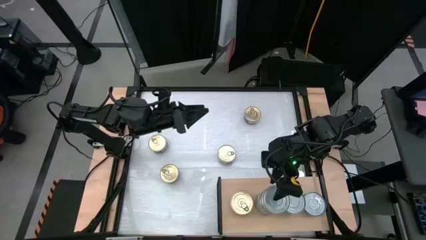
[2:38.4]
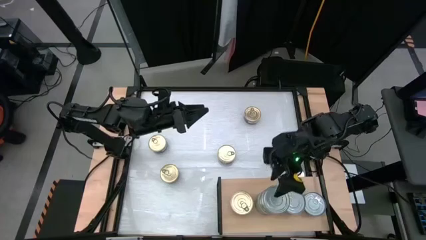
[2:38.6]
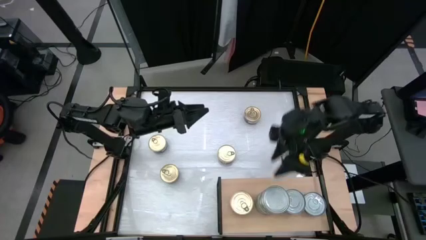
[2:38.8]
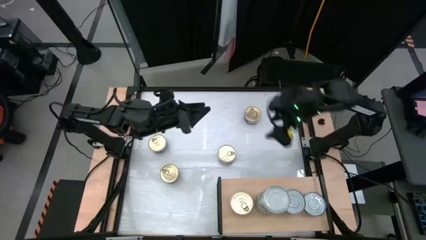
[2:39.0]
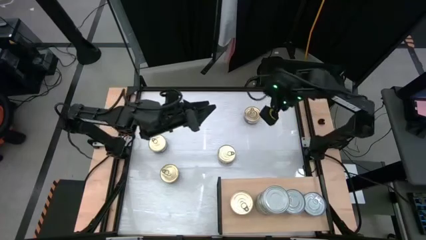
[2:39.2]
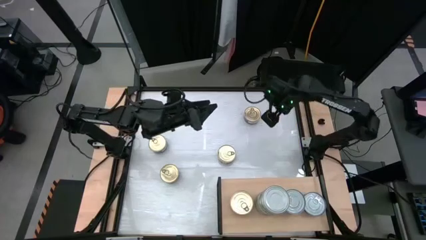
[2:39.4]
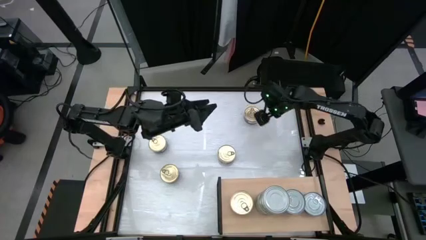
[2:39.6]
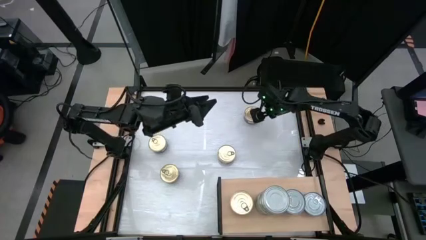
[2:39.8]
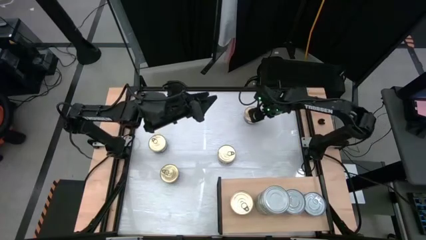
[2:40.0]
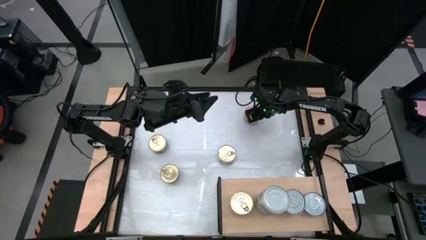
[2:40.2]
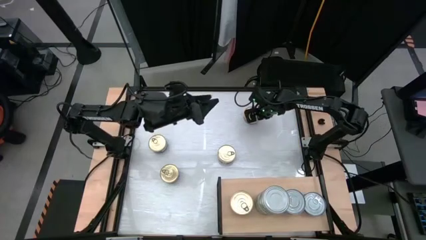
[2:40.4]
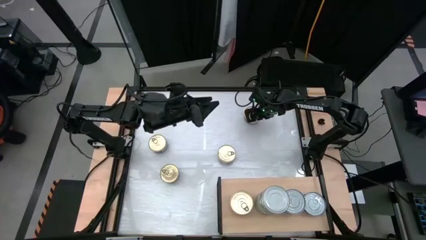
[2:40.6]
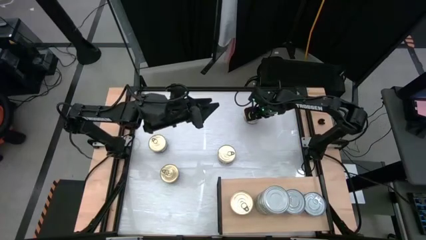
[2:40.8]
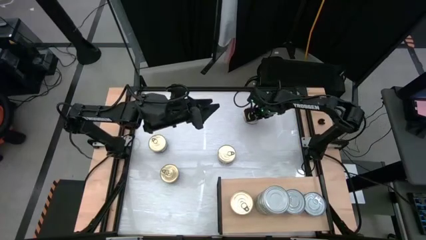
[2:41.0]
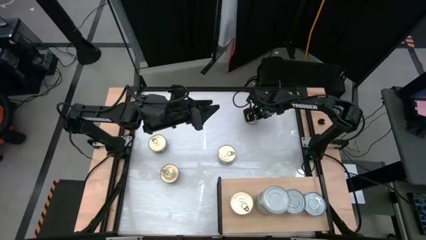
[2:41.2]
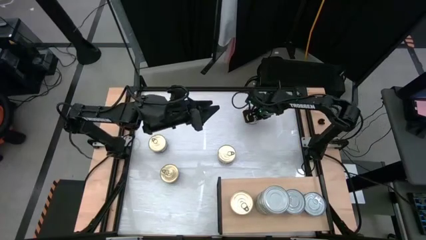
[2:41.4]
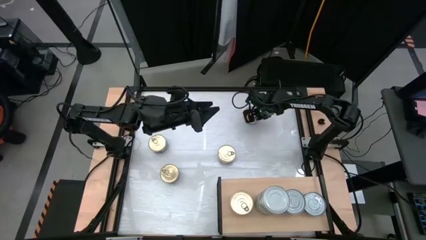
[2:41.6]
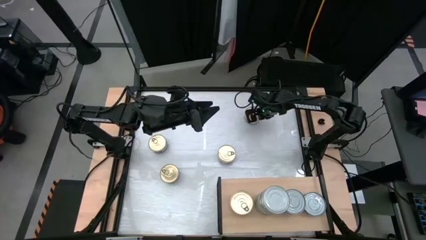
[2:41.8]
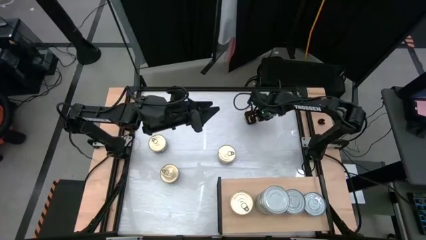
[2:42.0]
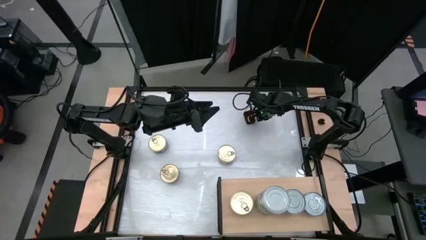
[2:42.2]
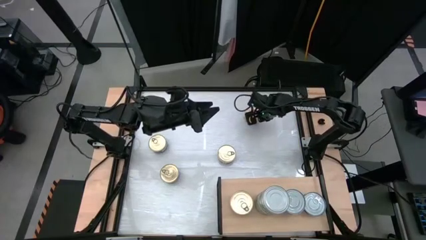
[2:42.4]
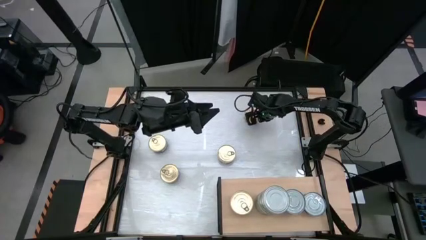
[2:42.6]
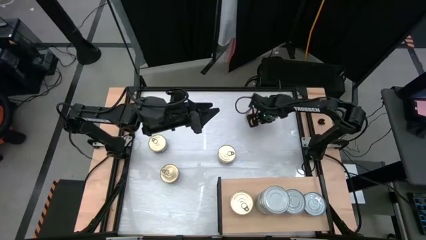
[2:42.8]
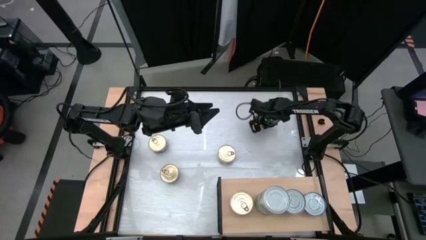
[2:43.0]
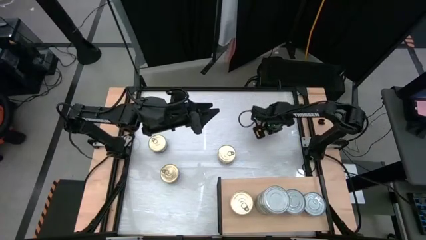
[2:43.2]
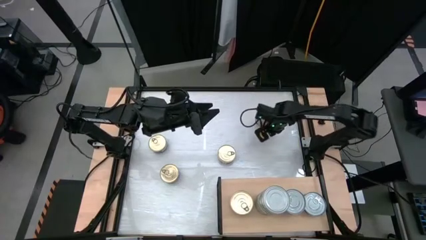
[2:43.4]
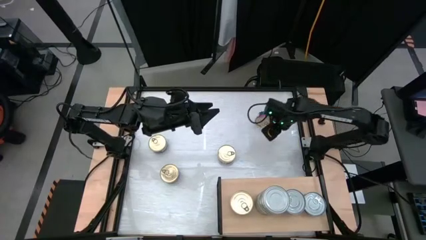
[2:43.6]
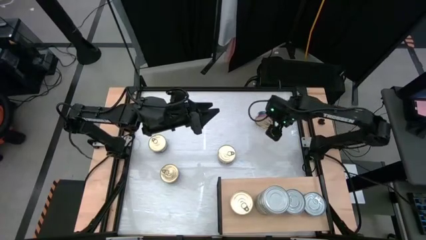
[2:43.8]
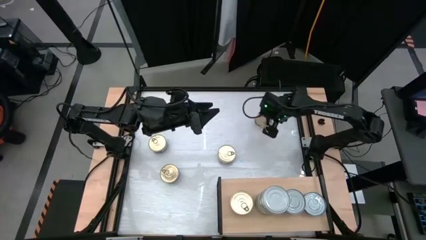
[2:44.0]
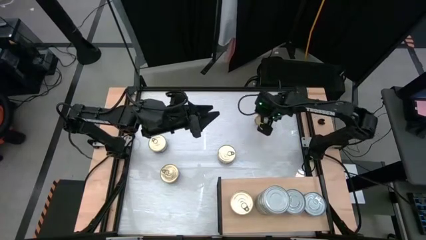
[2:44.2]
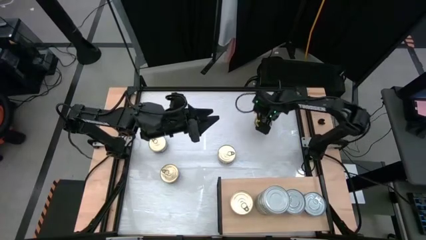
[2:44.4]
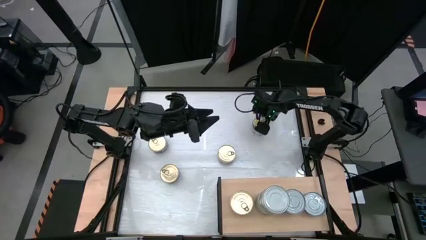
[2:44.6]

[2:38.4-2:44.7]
Task: Stack canned seafood by type on shelf
Stack the blue-pink tuna can on top of the other blue-pink tuna can on the shelf

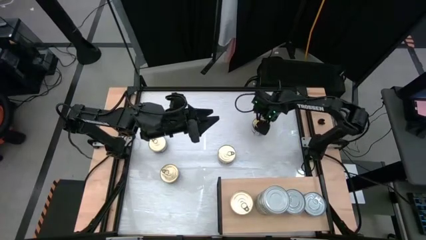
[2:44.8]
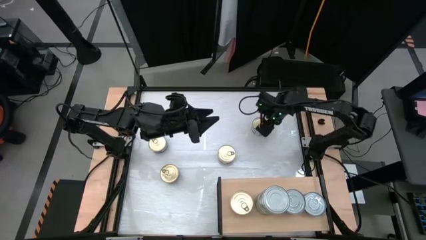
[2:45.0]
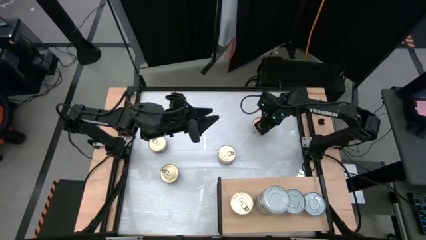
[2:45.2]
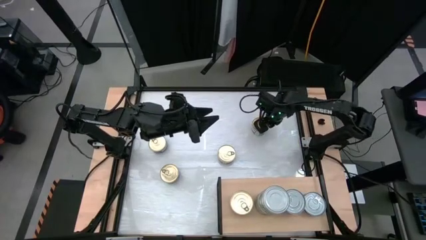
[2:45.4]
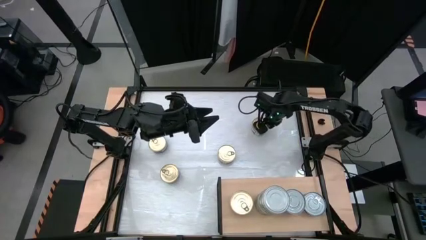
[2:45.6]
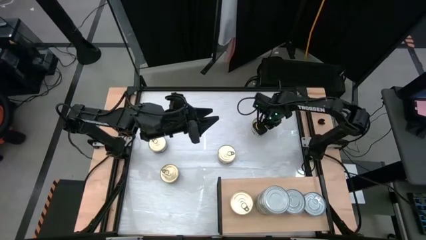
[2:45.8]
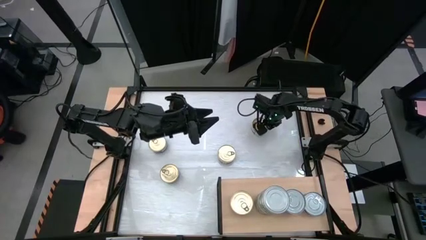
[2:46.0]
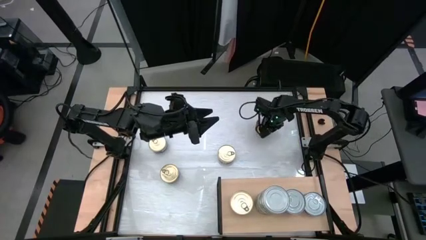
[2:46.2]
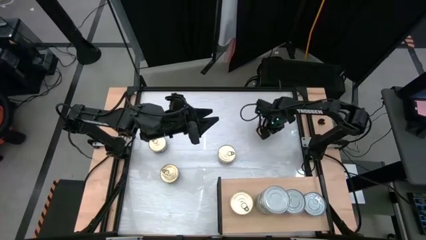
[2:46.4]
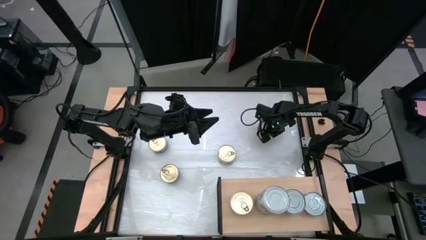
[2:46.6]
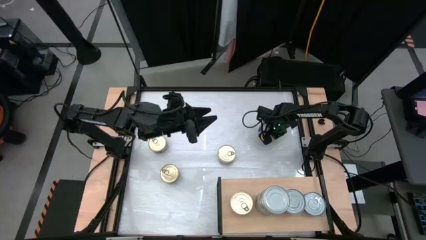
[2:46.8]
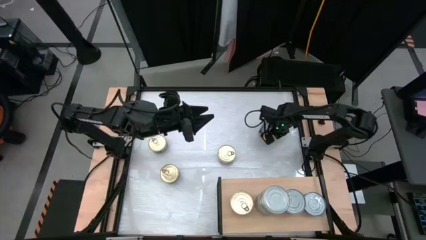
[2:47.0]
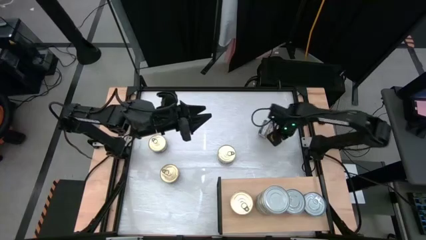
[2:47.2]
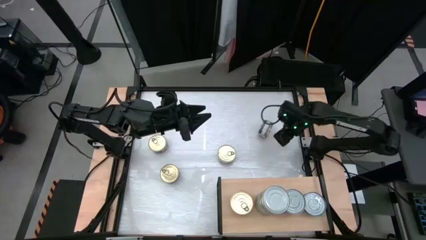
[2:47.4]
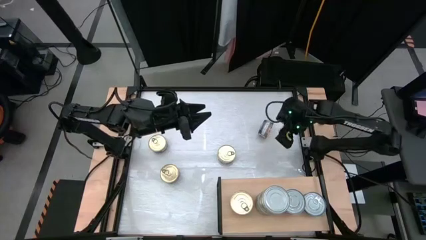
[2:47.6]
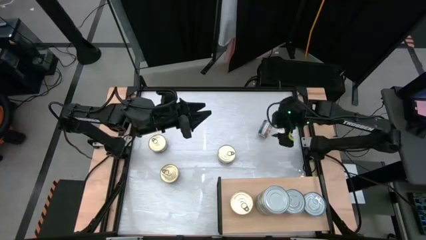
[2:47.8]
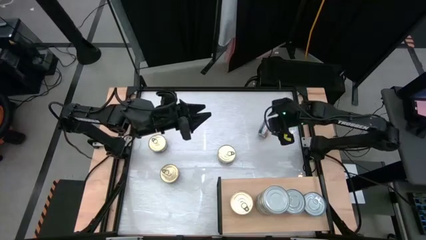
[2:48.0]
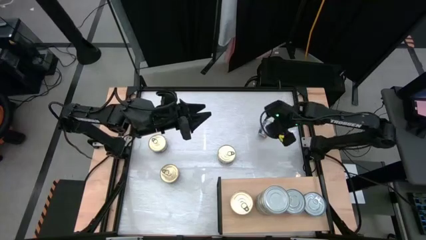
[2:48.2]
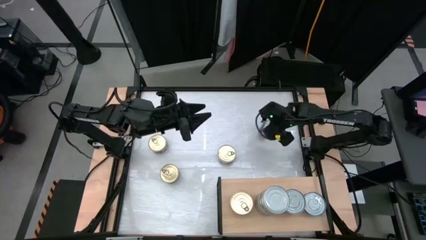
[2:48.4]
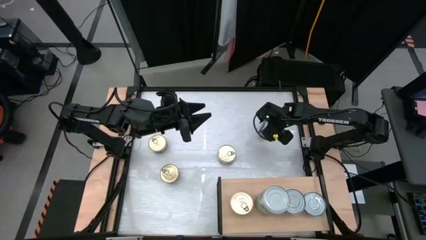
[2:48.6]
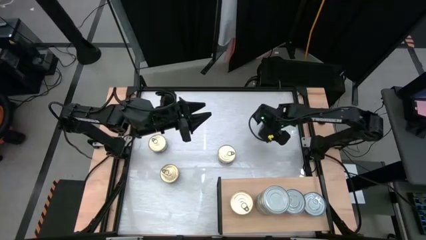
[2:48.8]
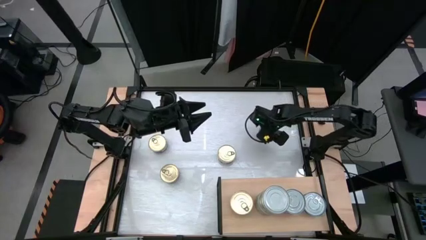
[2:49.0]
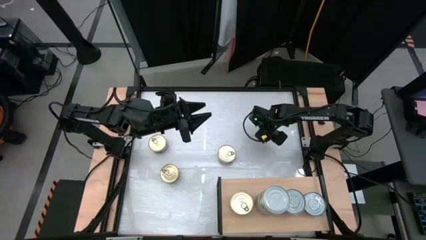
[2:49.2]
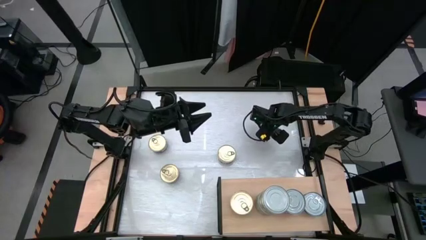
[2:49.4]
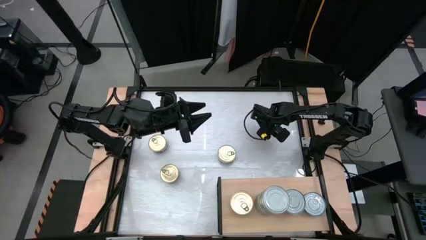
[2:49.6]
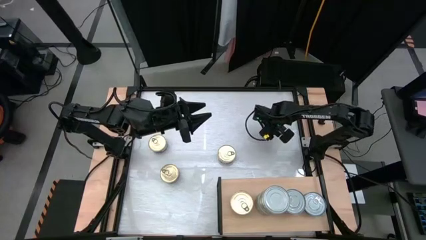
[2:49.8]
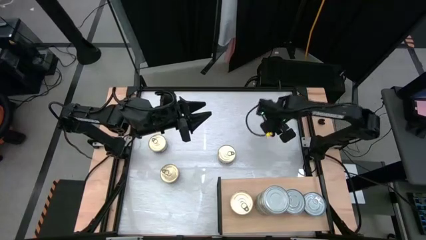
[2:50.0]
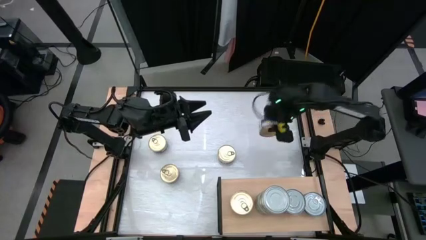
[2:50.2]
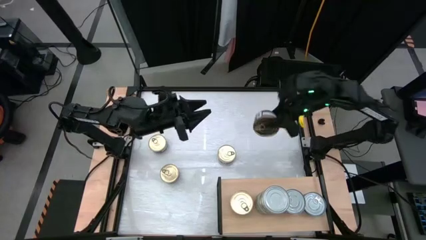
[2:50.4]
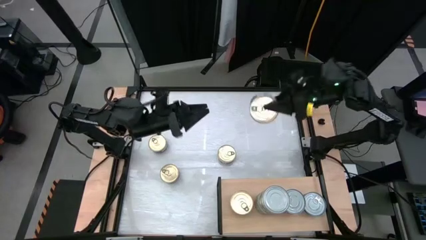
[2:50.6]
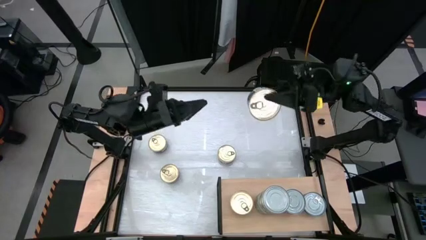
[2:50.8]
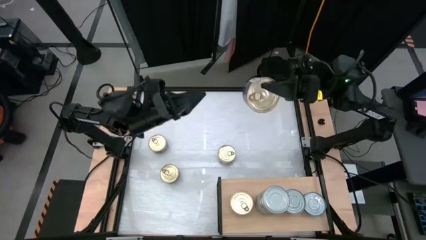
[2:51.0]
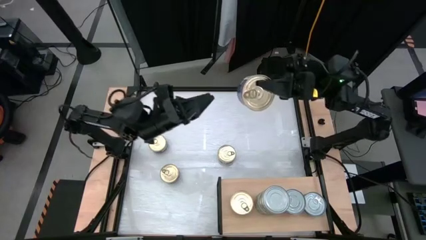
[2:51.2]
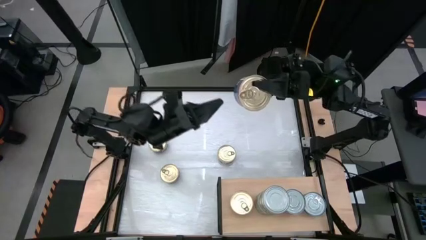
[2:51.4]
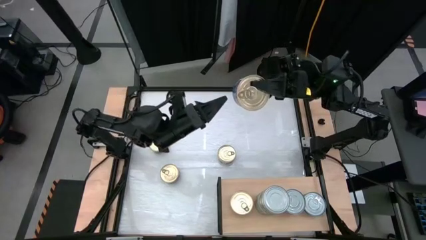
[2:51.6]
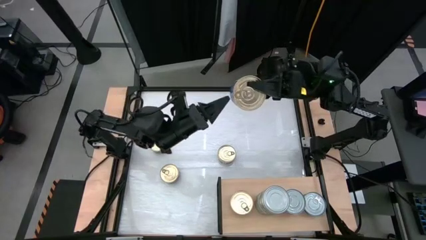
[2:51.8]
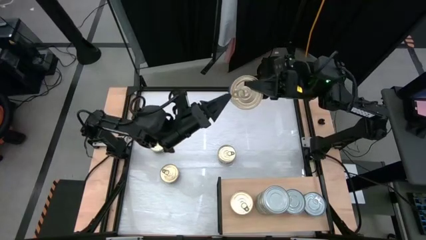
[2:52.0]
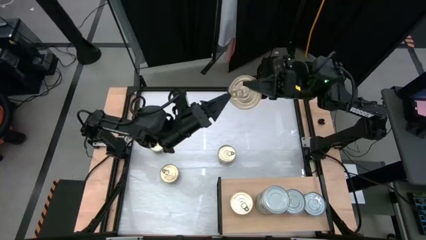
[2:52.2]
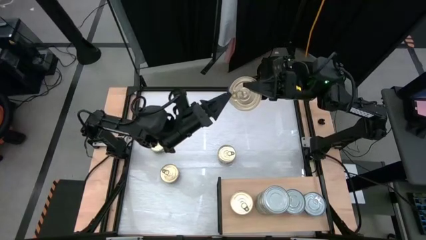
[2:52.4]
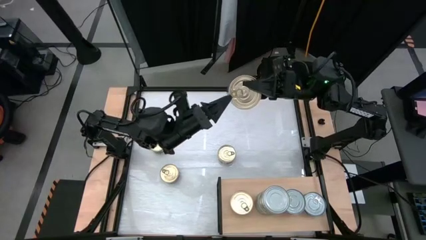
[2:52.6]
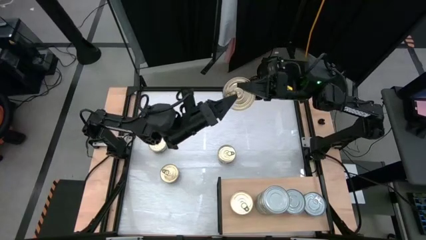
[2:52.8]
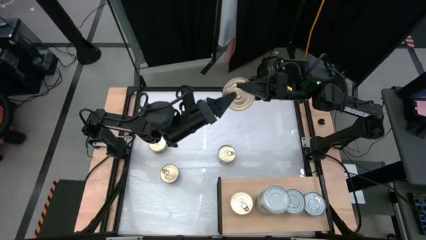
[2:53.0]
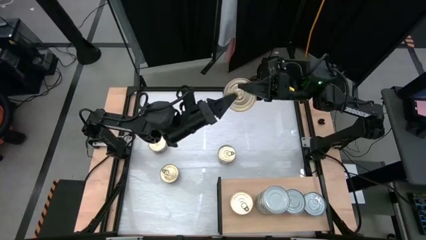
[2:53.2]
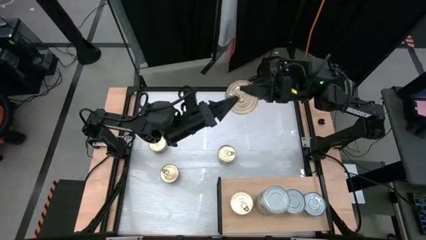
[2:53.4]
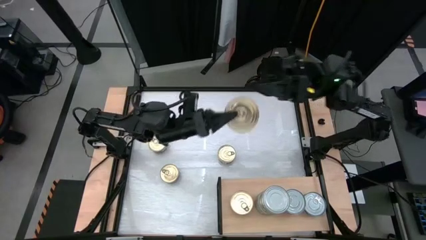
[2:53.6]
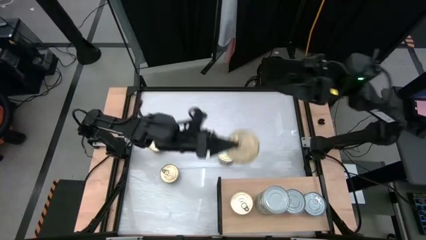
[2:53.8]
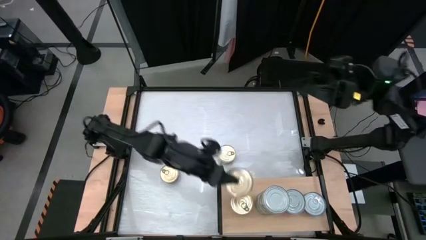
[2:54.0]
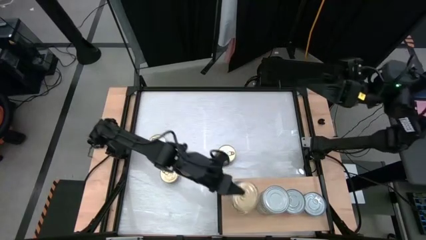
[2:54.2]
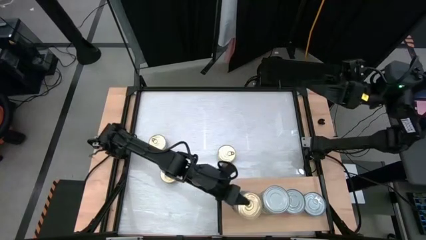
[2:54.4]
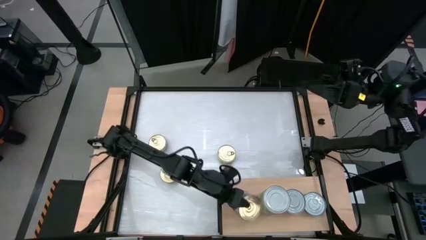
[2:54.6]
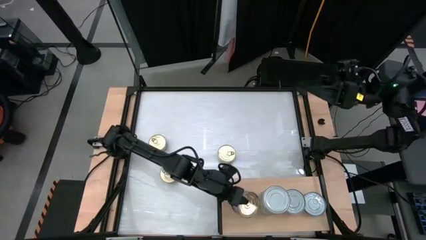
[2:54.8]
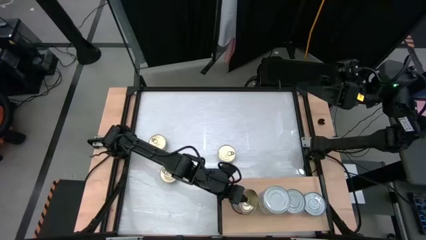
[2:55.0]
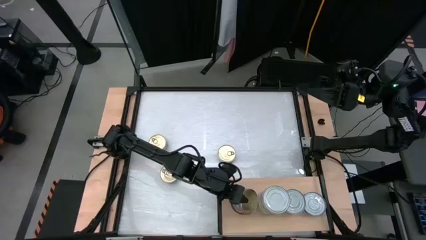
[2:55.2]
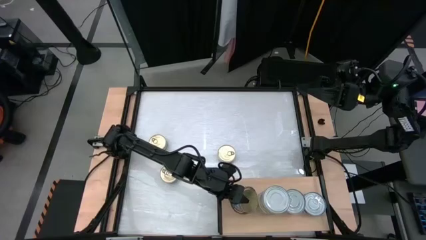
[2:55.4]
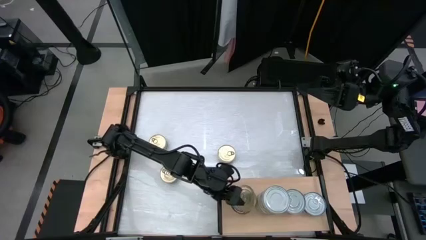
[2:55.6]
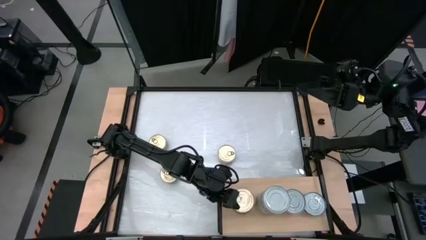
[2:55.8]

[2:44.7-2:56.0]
Stack the blue-pink tuna can on top of the other blue-pink tuna can on the shelf
